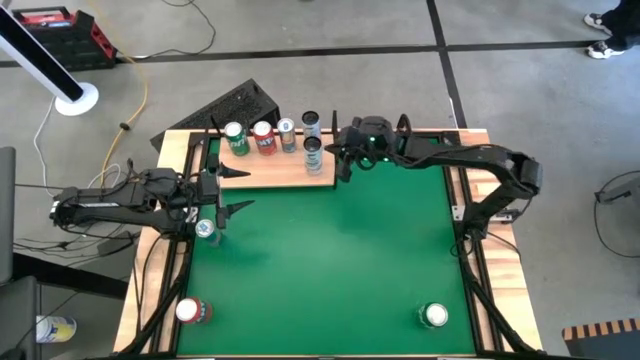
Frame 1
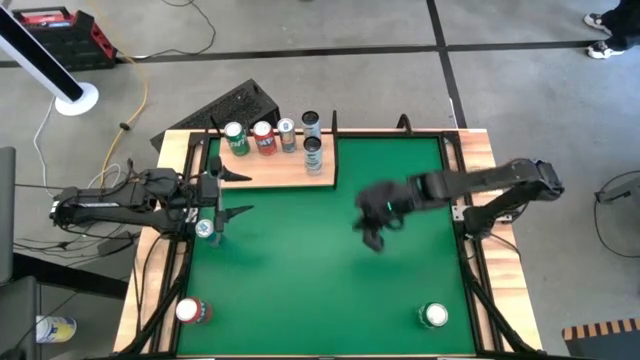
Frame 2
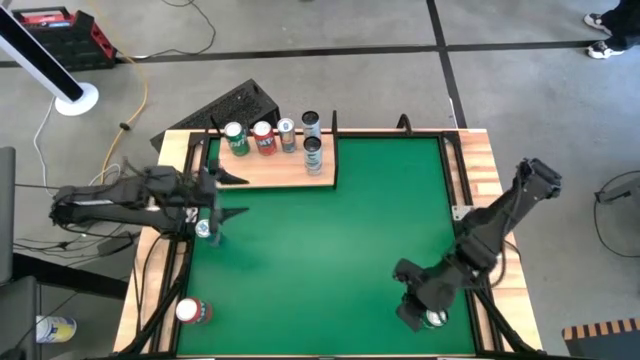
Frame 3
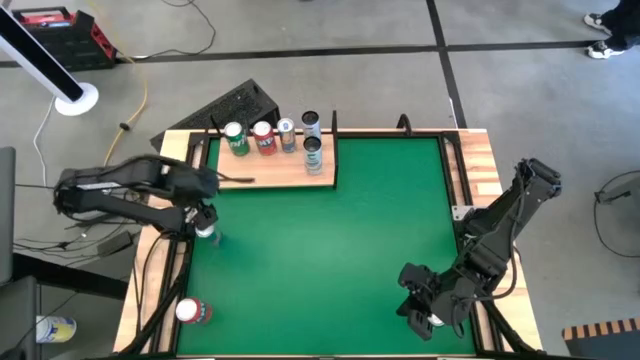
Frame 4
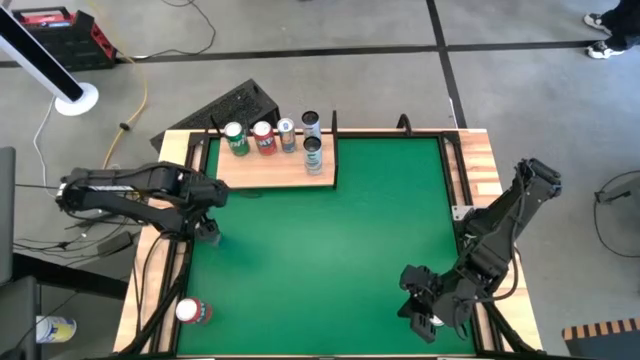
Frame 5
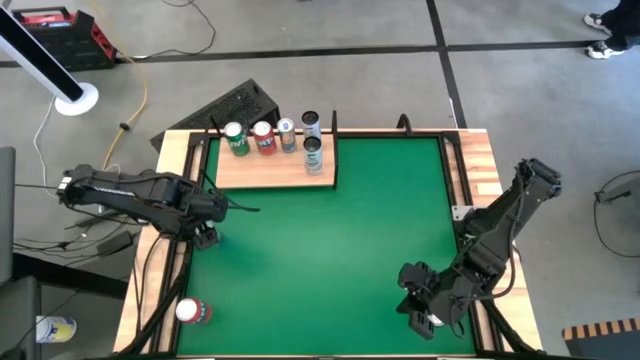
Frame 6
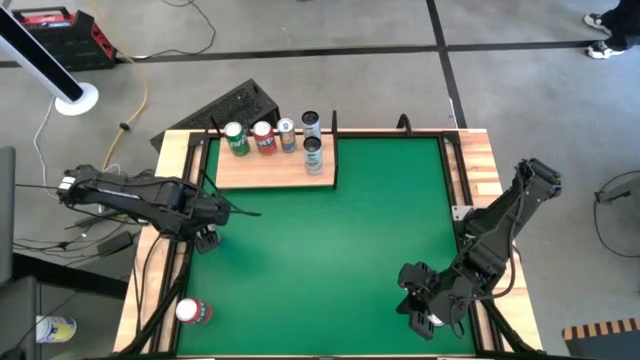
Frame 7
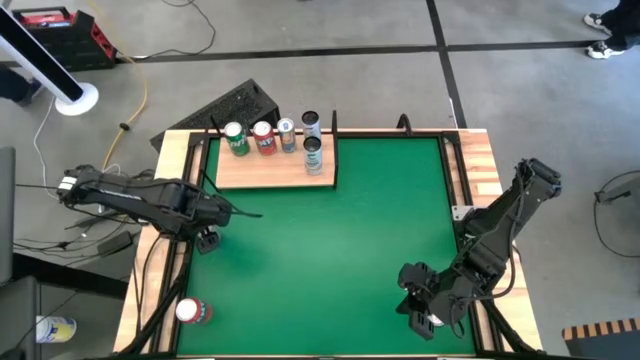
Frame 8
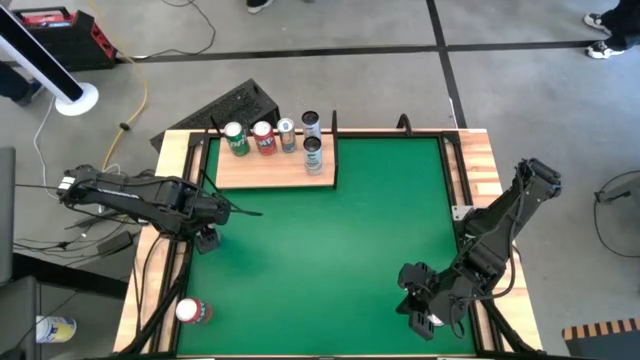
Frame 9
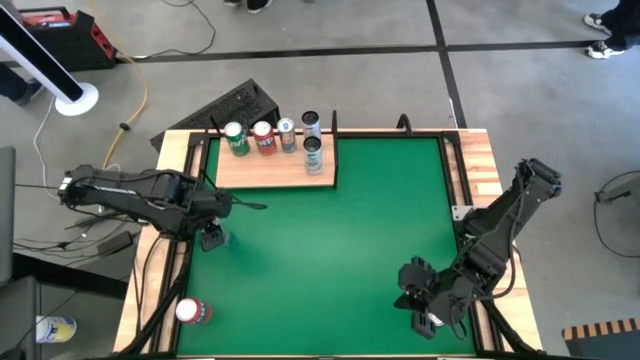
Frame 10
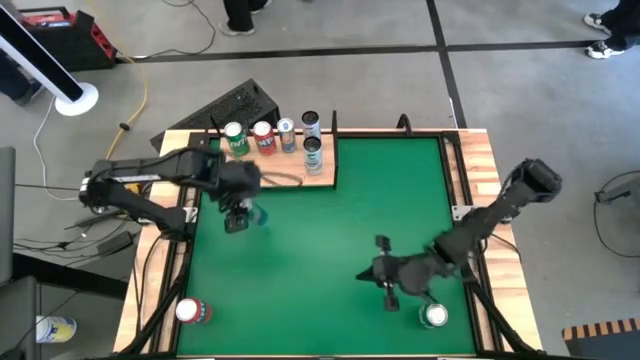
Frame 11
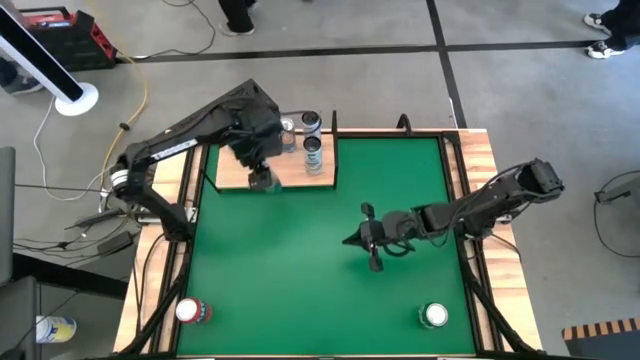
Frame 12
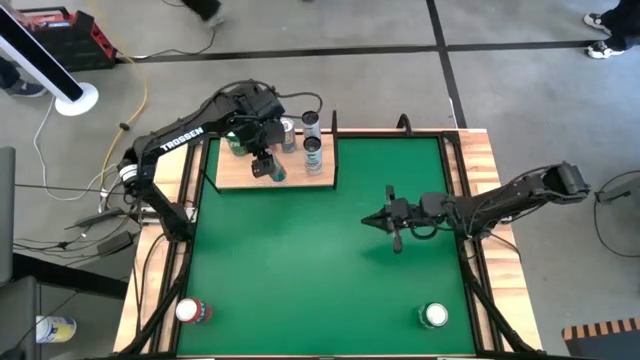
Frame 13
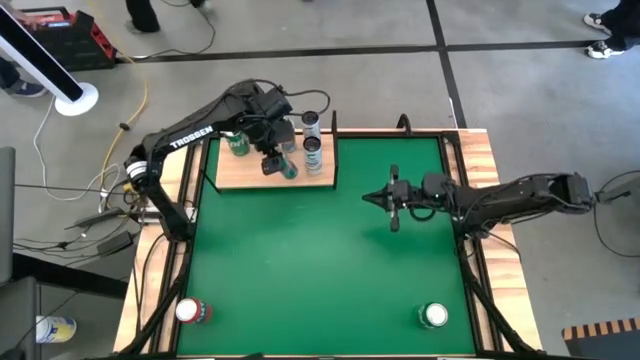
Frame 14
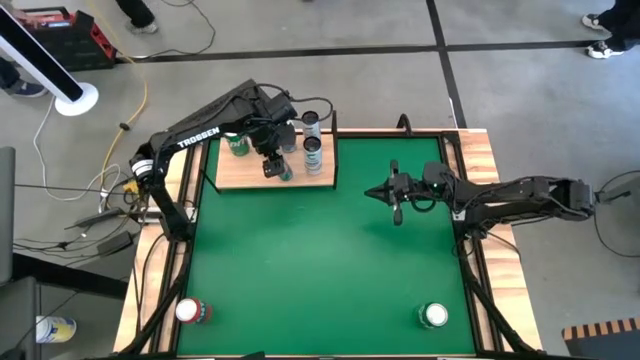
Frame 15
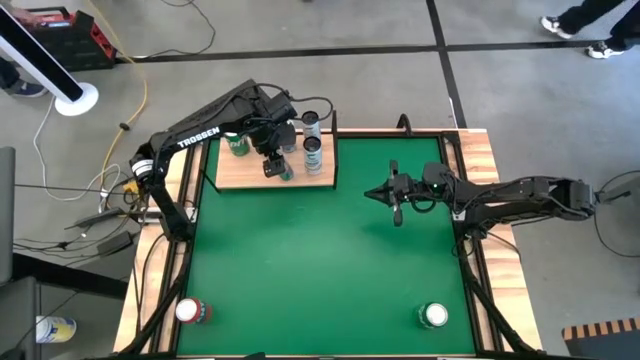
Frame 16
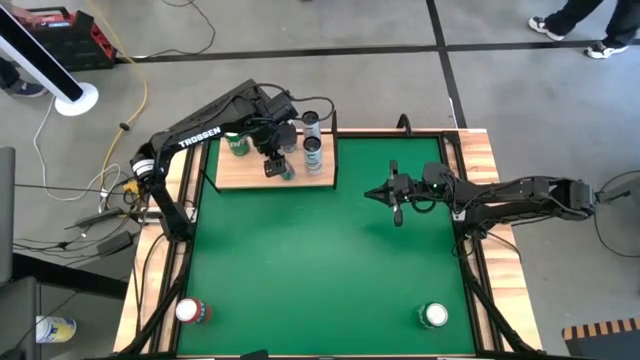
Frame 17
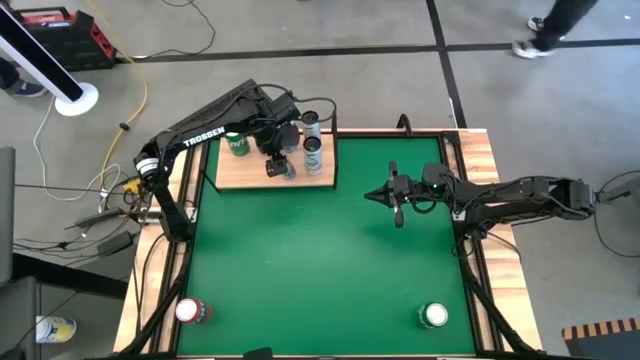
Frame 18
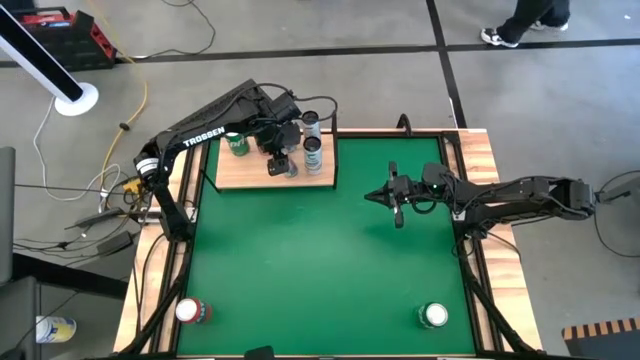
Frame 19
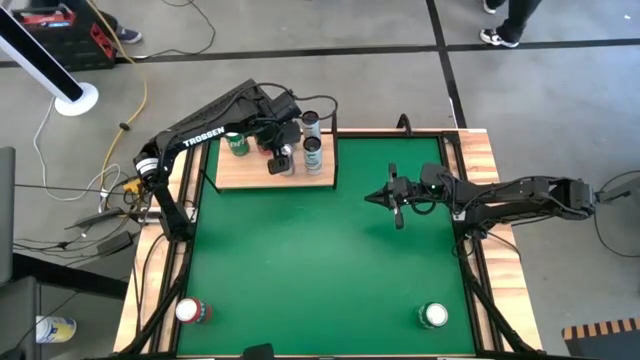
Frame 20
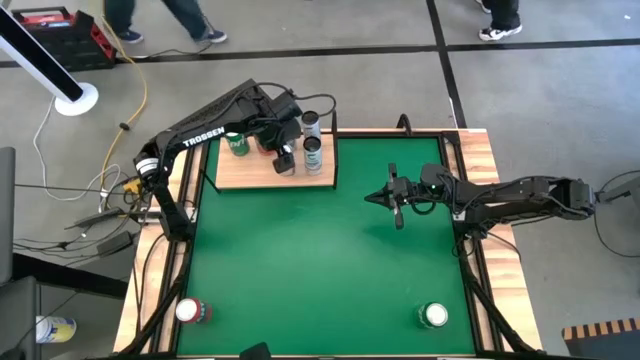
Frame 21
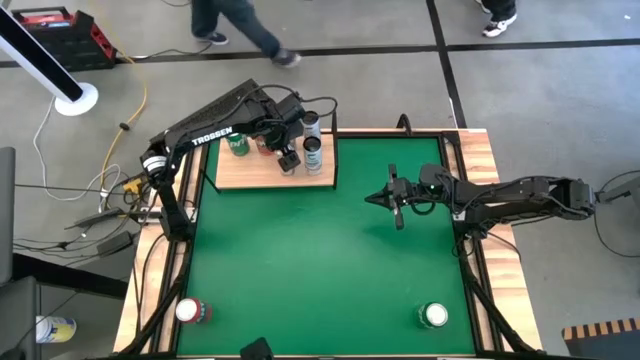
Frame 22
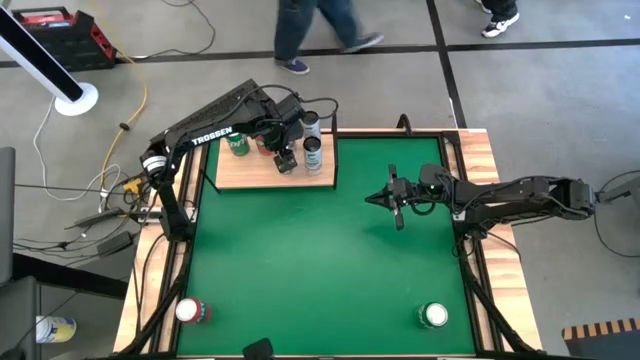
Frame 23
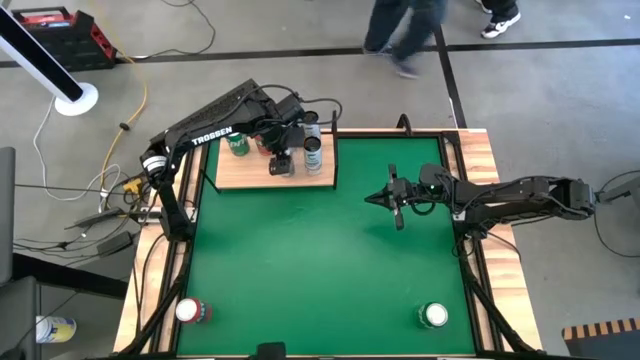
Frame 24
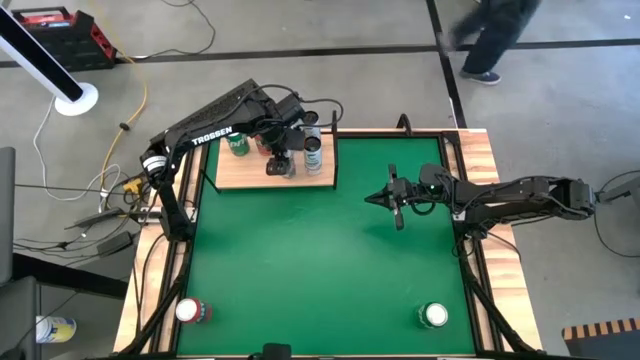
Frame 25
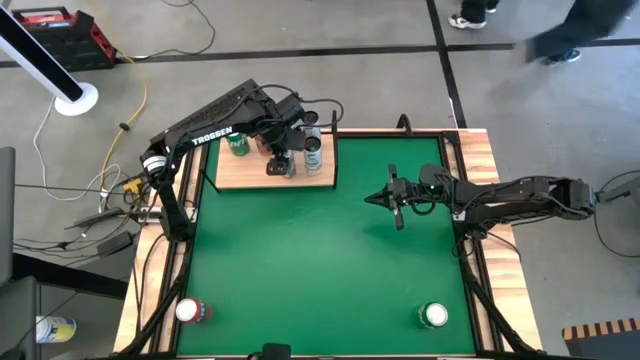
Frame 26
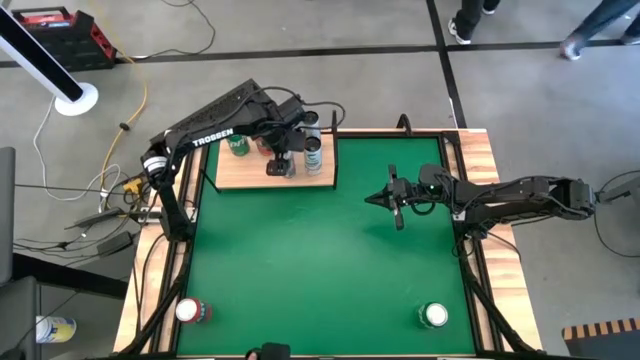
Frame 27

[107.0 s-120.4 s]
Task: Place canned beverage on shelf
Put the blue soda can on the shelf aligned with the other blue soda can

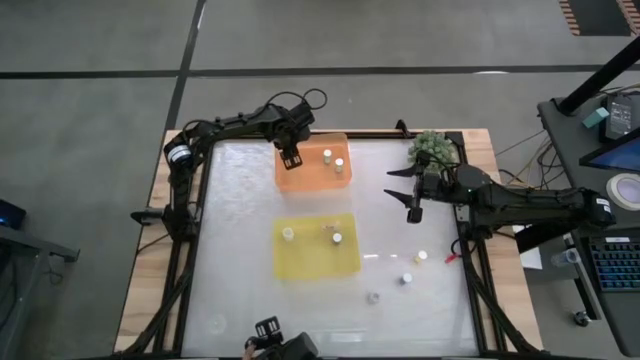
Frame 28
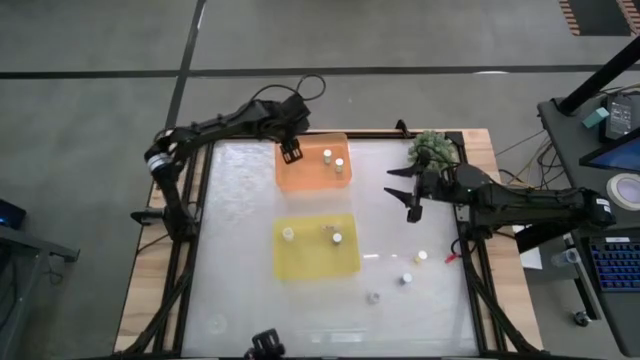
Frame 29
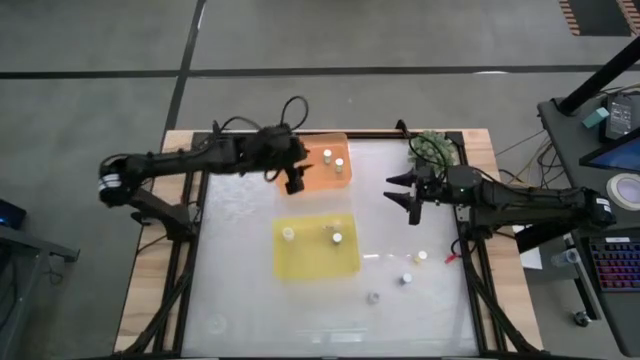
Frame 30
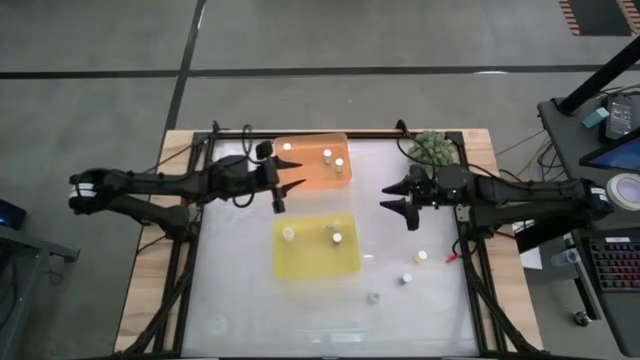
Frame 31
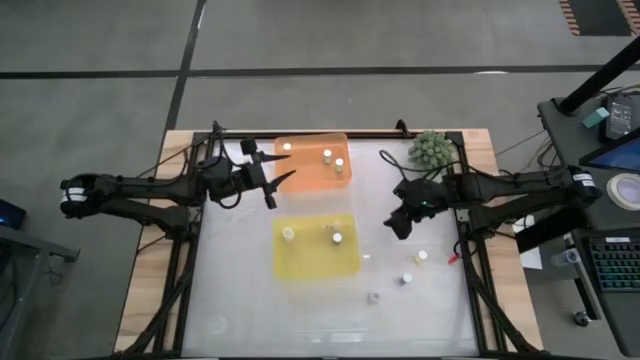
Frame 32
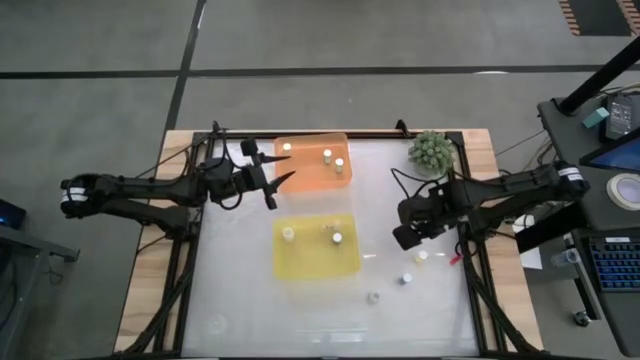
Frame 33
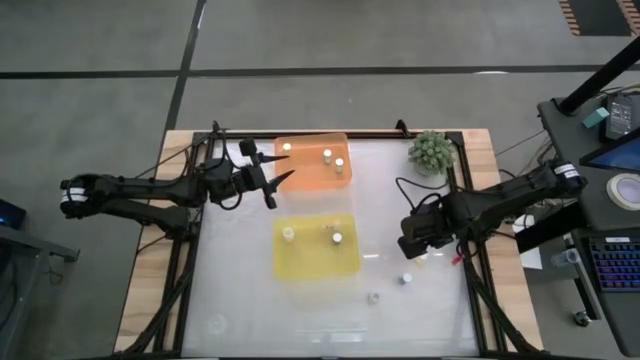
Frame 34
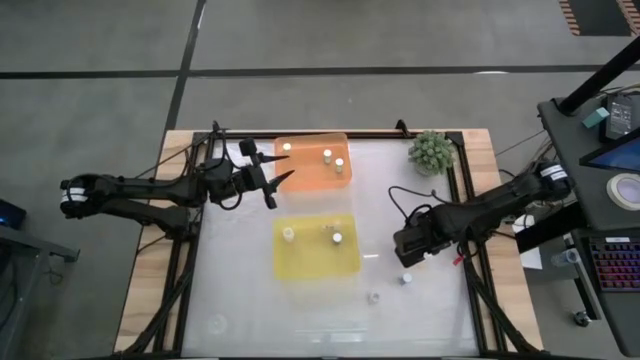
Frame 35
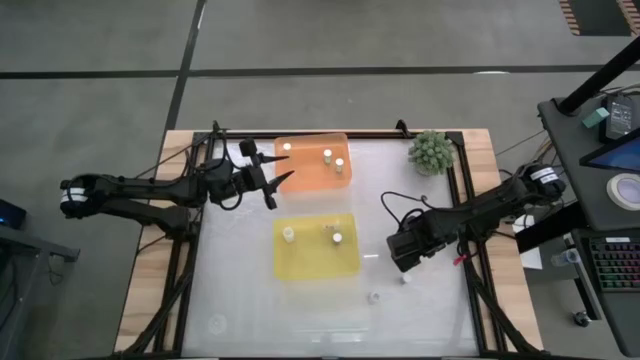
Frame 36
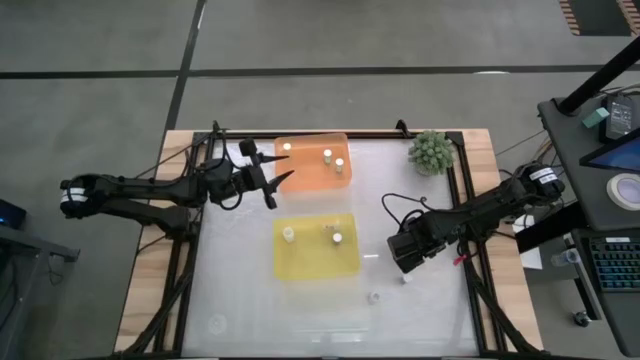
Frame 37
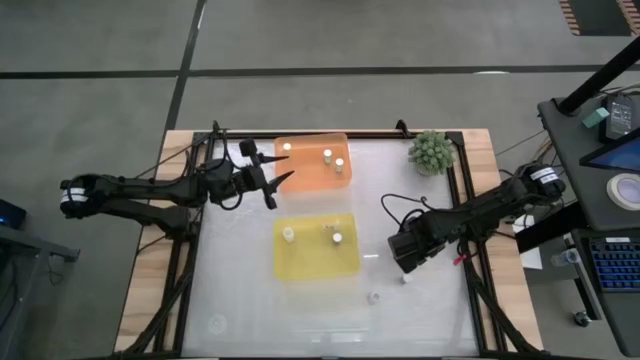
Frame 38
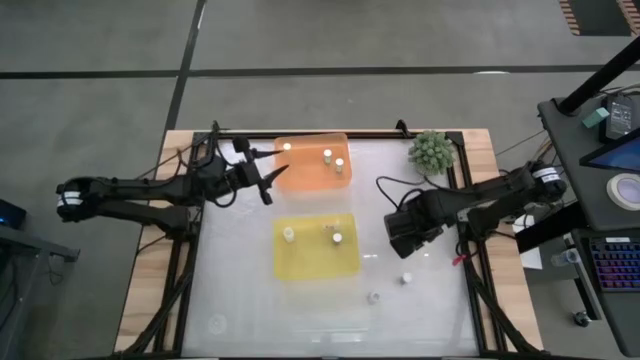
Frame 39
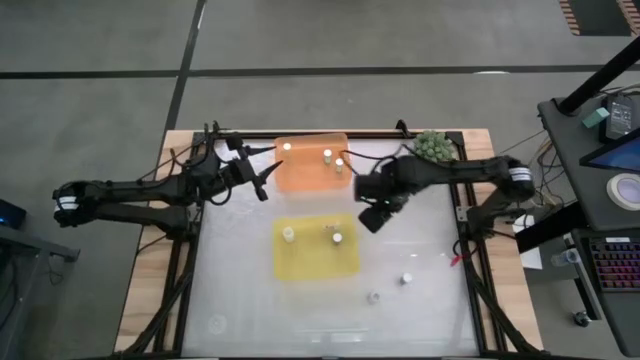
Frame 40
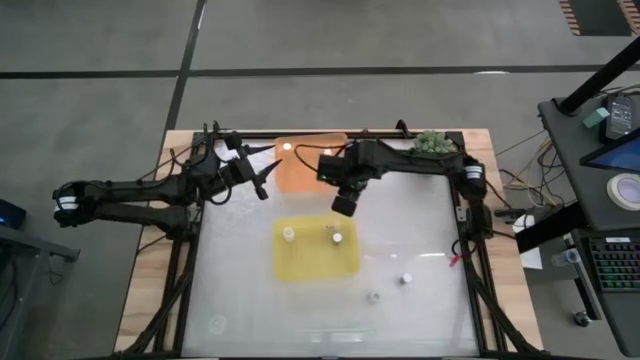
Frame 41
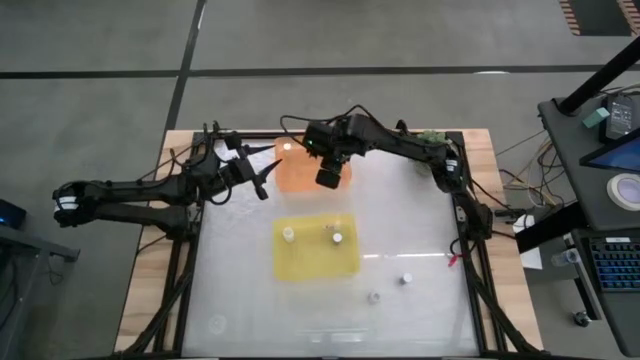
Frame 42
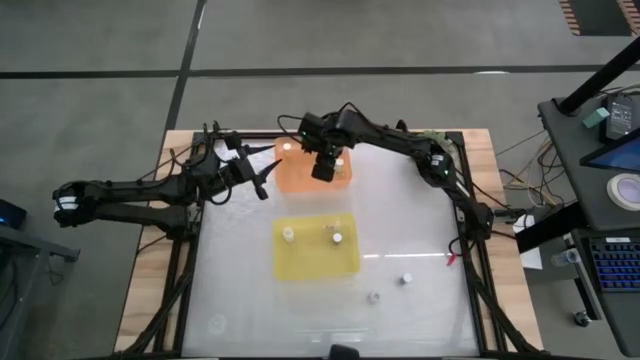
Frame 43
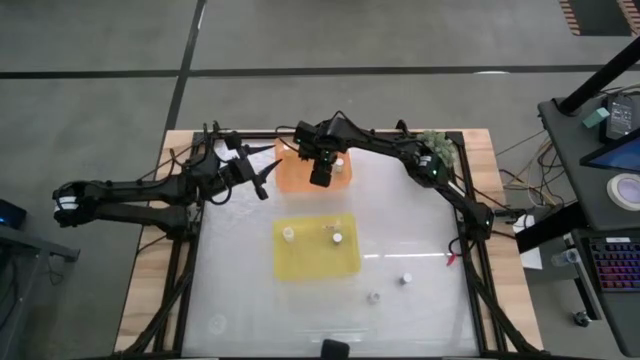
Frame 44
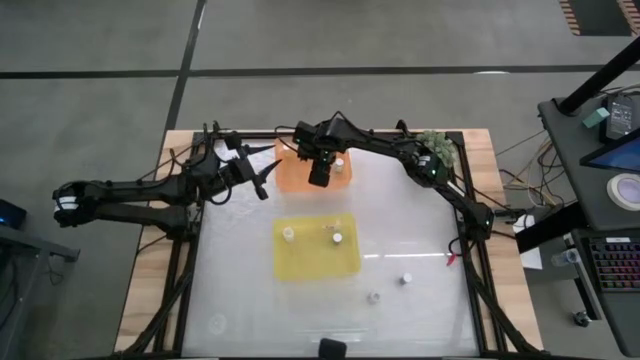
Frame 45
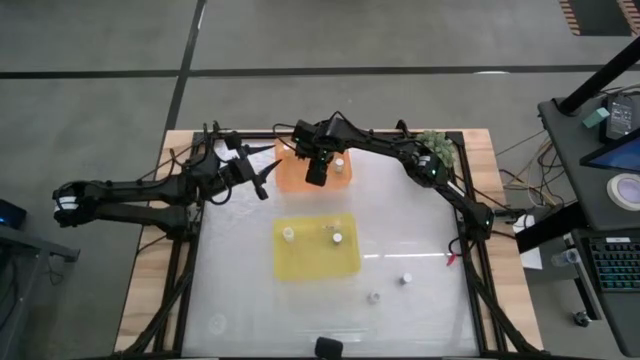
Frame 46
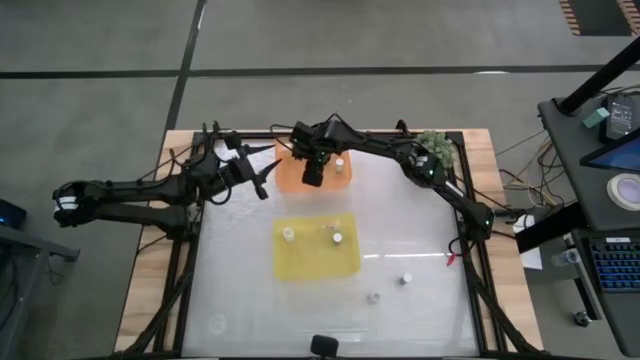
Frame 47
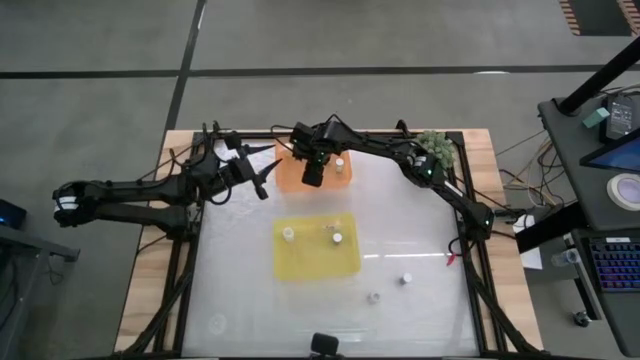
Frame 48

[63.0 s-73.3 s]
Task: Pick and place medicine bottles into bin by pill shape (circle, oval)
Put the yellow tablet bottle into the orange bin
